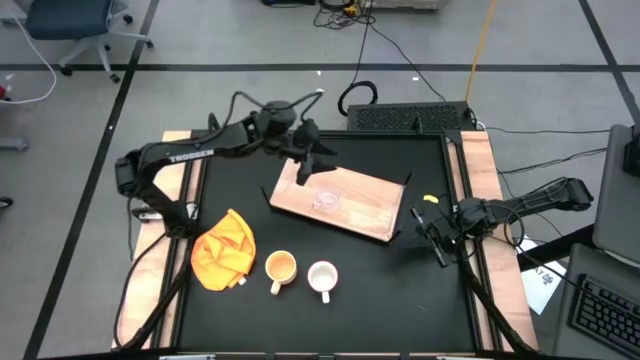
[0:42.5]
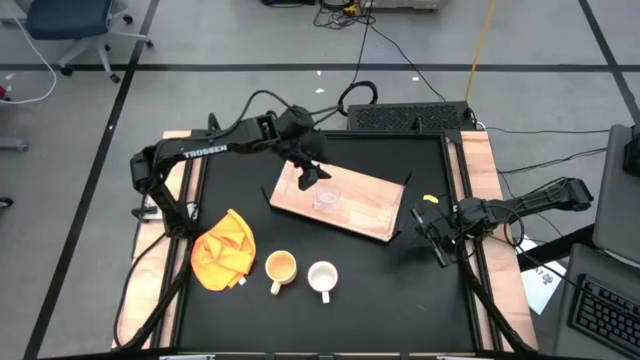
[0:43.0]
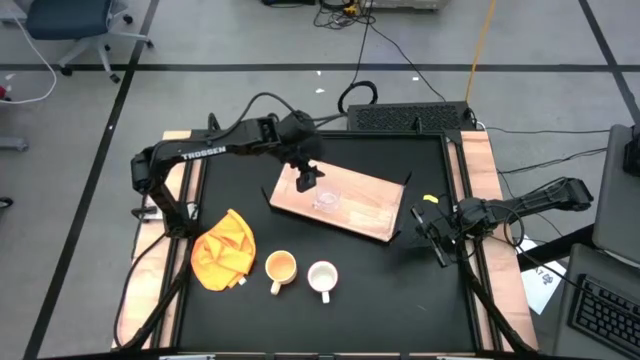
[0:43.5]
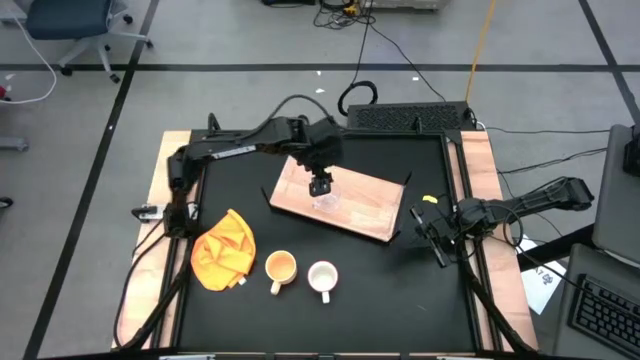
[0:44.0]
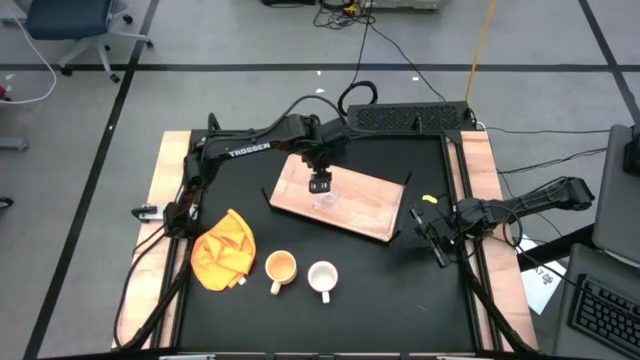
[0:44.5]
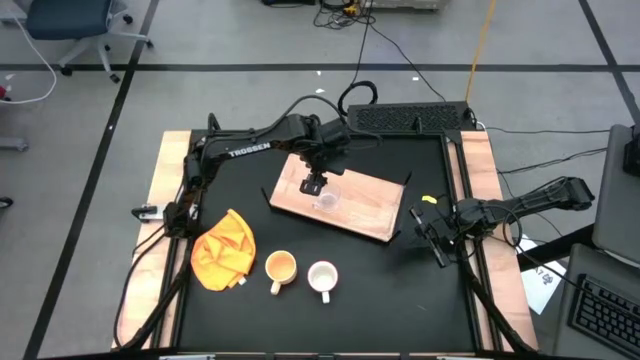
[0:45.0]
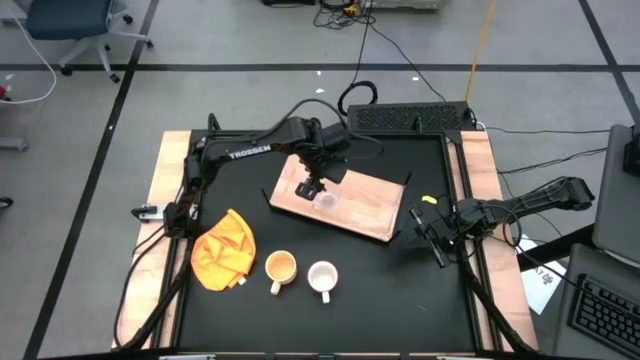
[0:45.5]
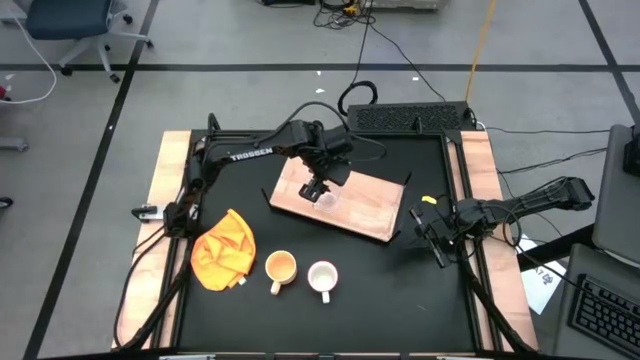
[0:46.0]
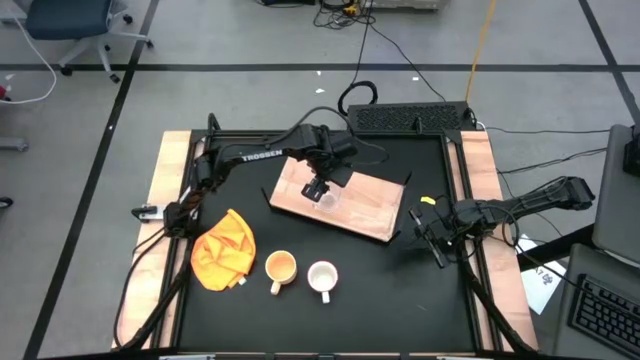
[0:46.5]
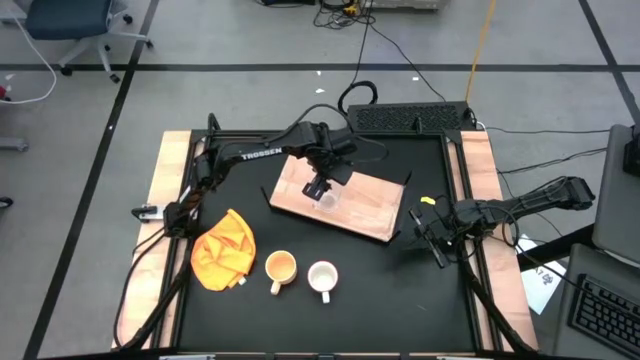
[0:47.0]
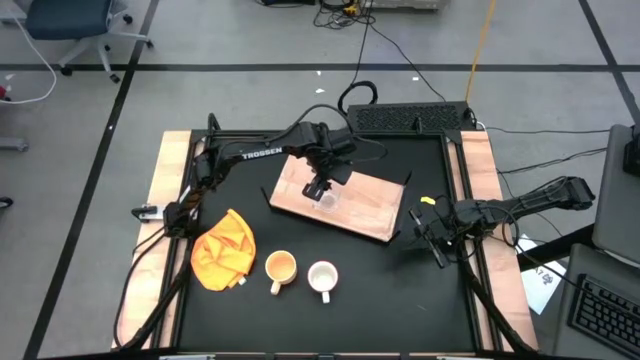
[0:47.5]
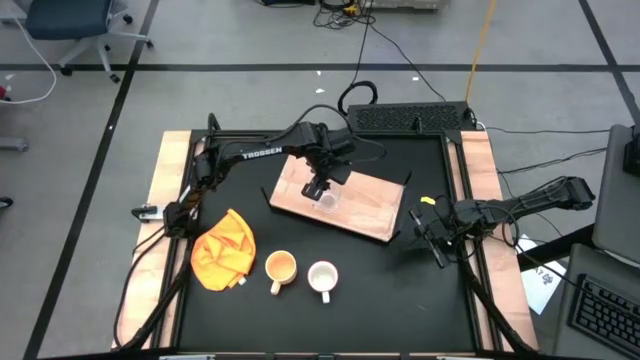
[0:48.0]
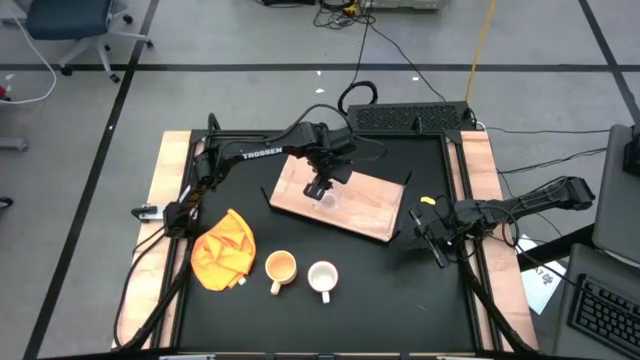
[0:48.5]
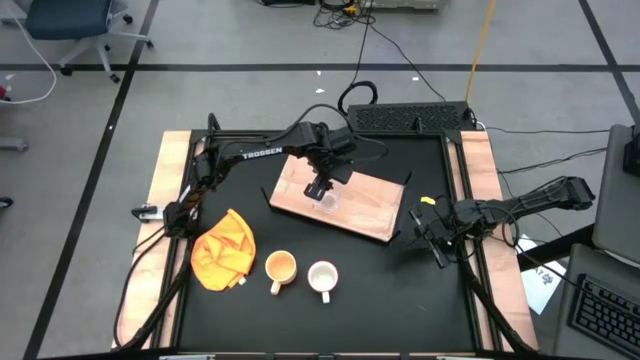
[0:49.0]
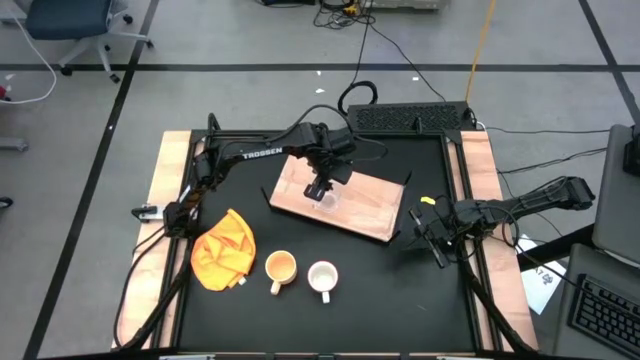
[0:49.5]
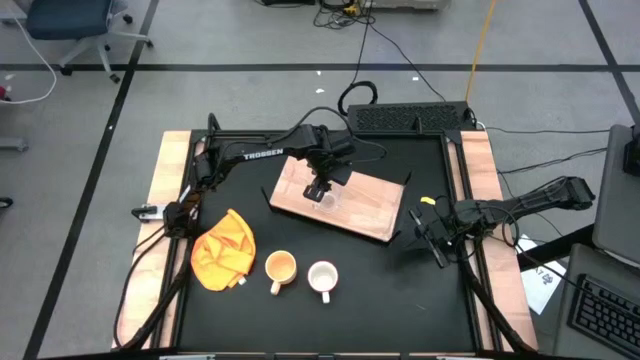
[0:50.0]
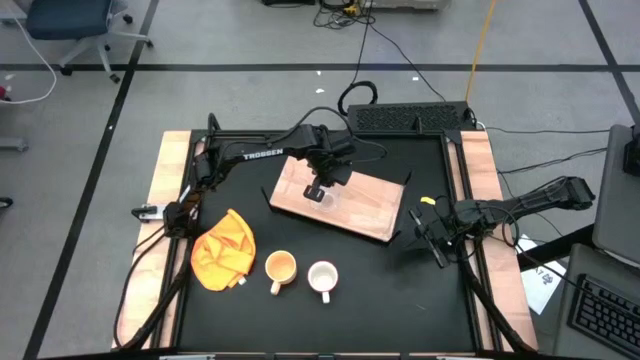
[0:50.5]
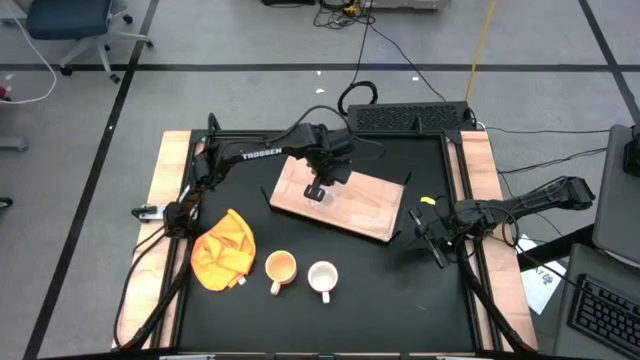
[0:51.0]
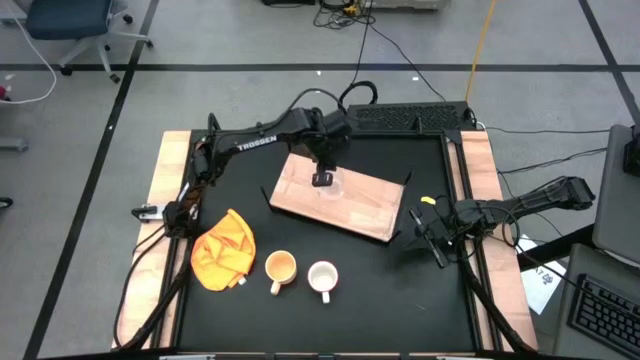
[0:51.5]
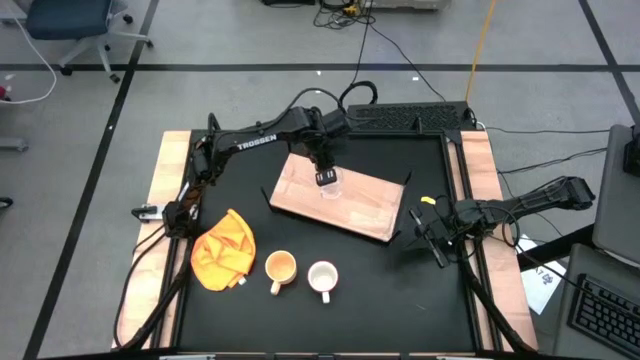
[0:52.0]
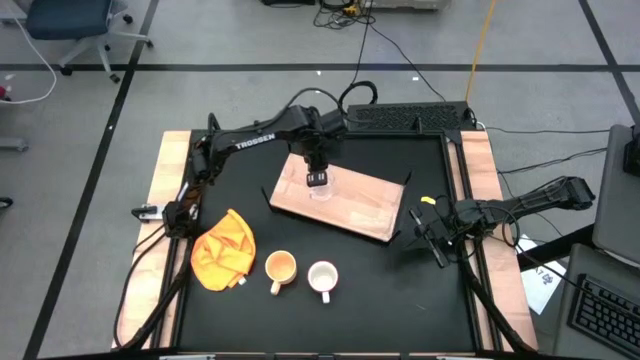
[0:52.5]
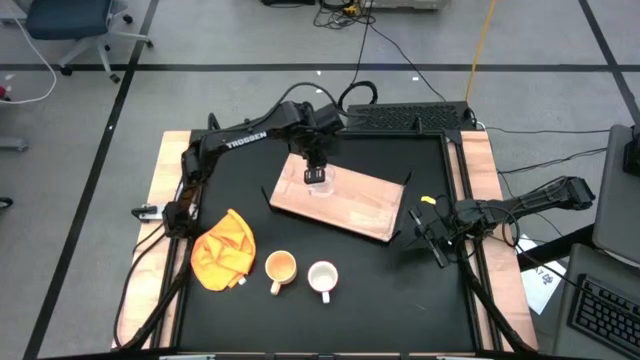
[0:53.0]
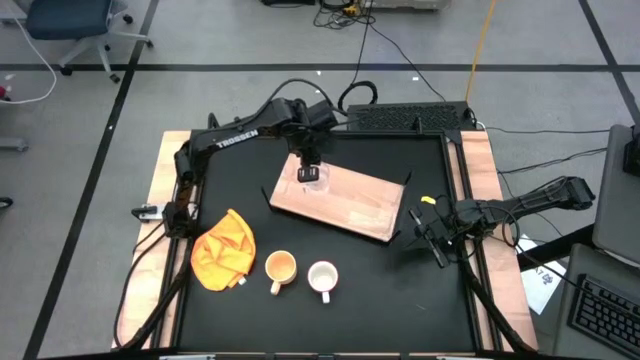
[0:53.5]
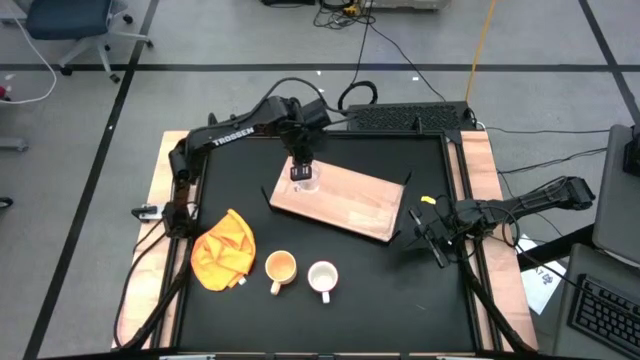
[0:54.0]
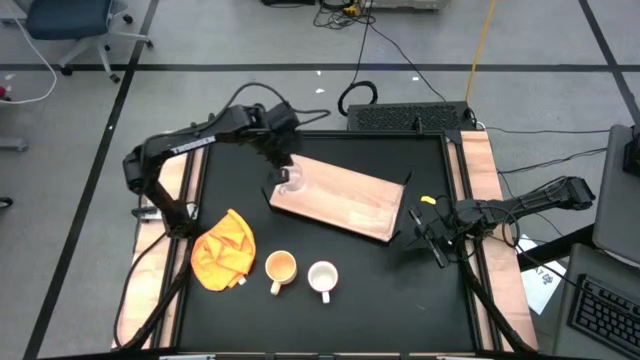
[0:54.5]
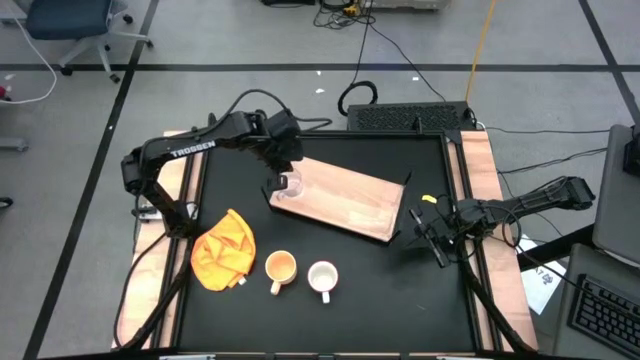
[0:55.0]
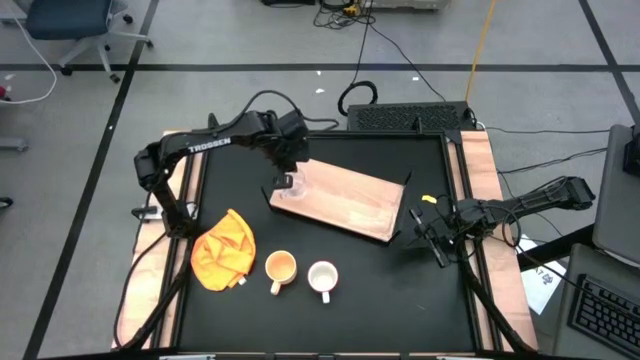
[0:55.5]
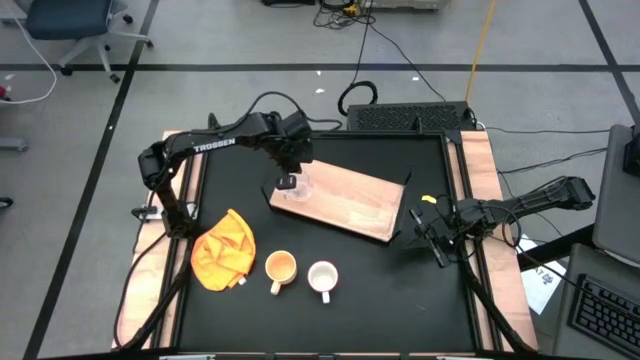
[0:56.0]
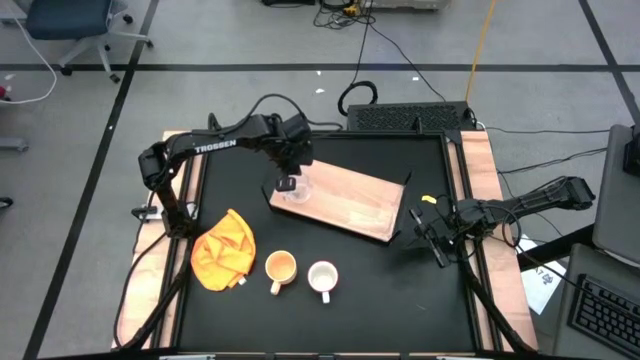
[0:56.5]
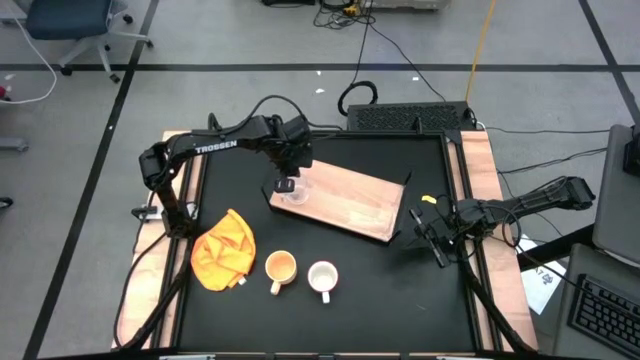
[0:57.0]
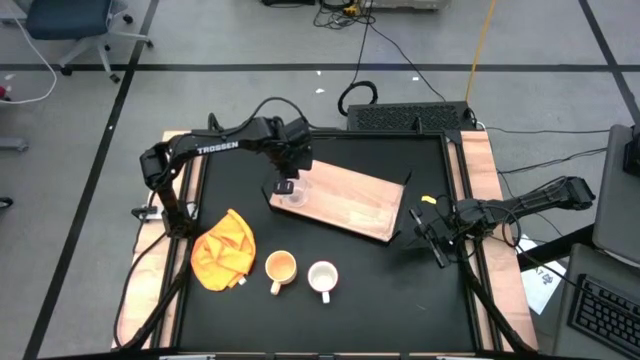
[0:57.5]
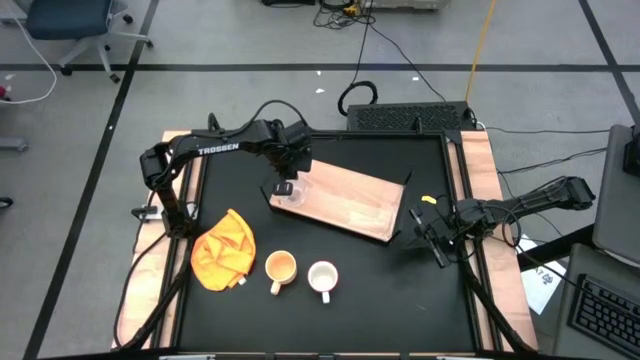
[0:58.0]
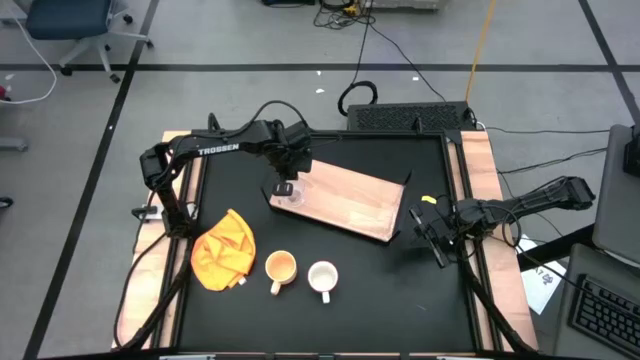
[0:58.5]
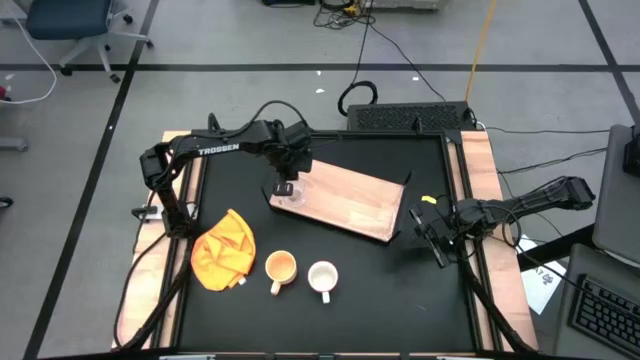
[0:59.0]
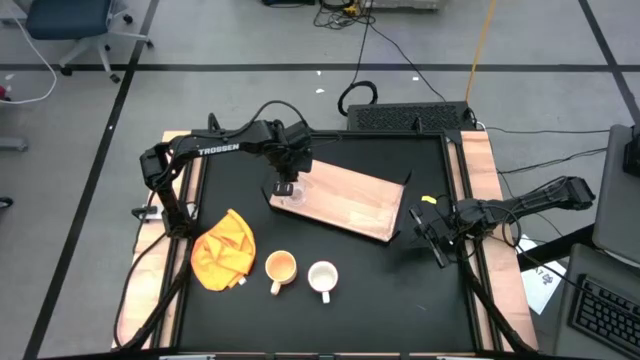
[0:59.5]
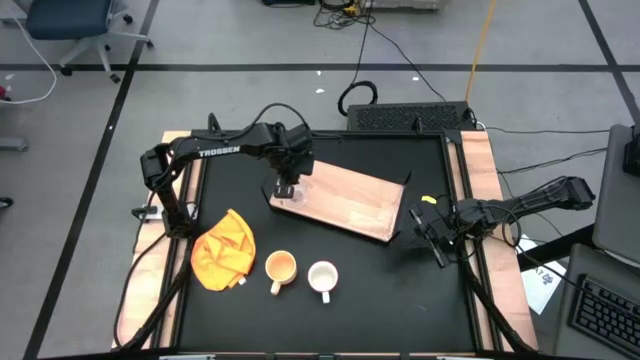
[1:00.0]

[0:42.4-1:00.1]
Task: Stack small to large cups/mugs on shelf
Put the transparent mug on the shelf
